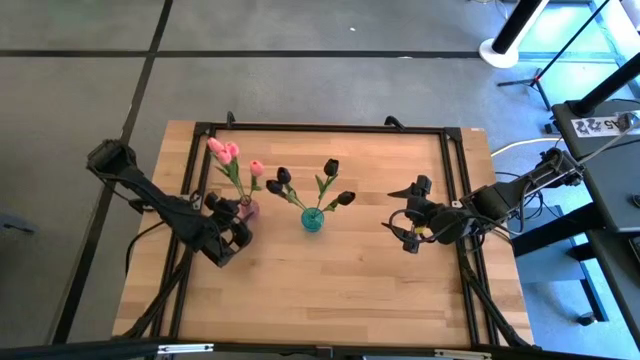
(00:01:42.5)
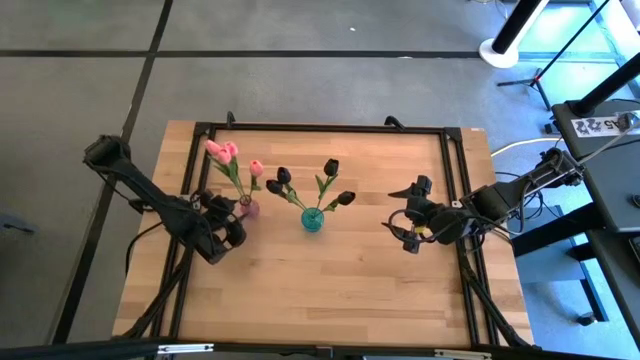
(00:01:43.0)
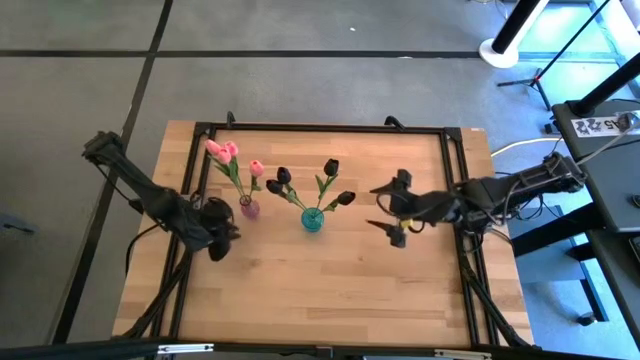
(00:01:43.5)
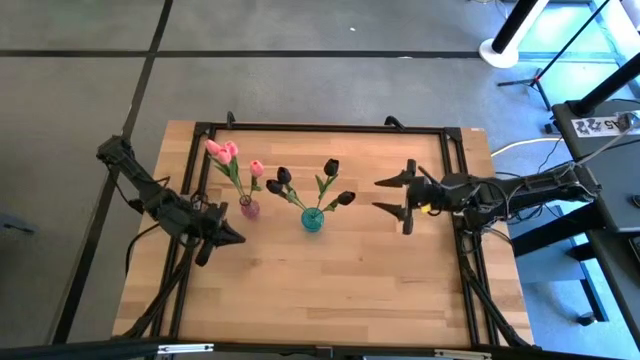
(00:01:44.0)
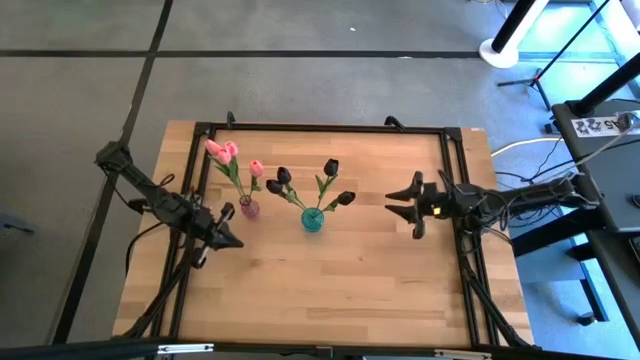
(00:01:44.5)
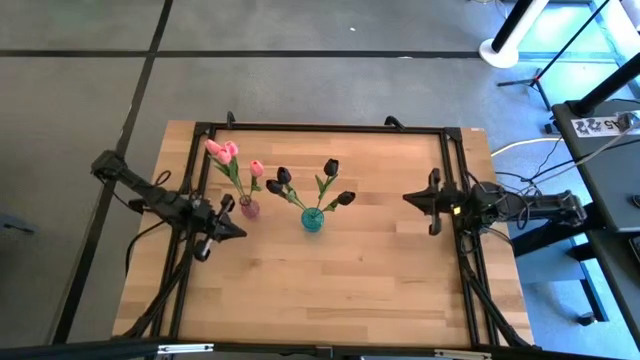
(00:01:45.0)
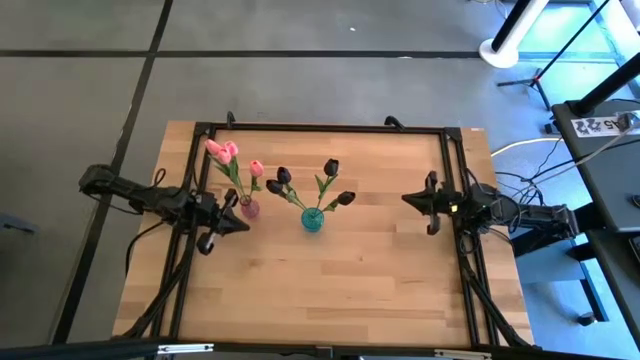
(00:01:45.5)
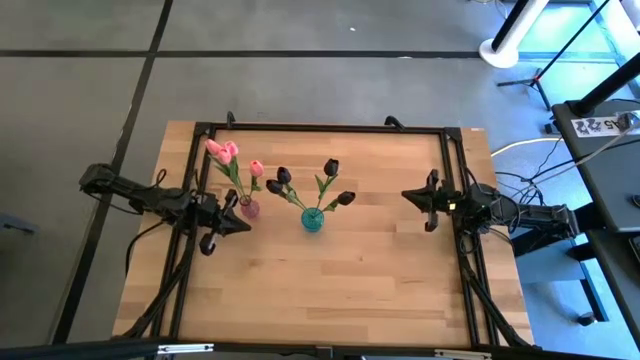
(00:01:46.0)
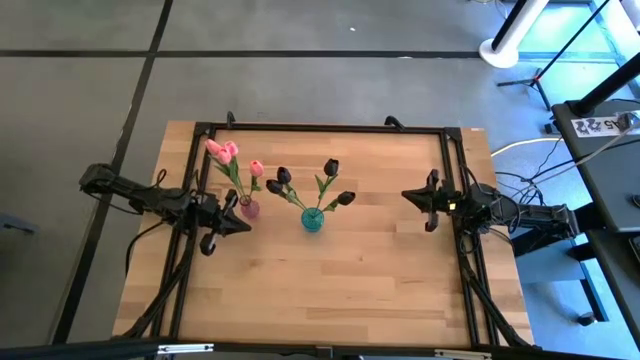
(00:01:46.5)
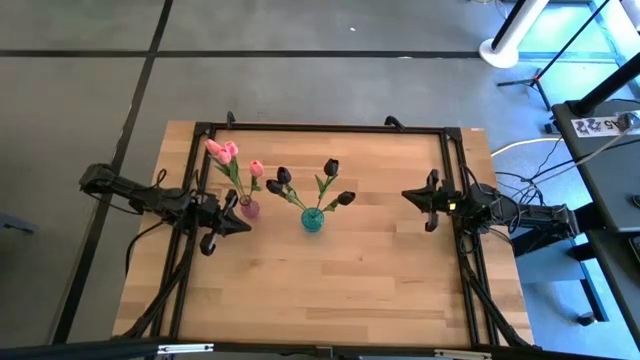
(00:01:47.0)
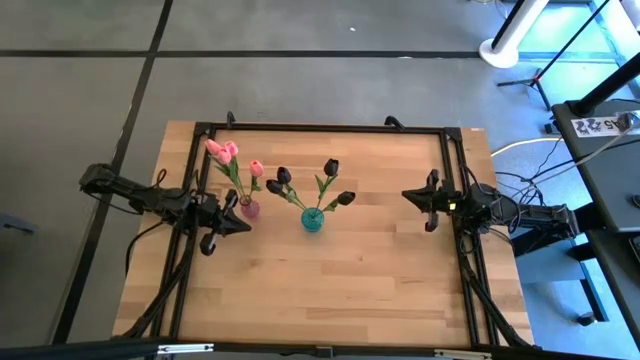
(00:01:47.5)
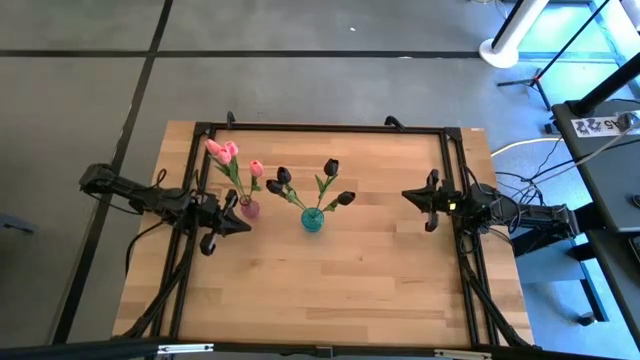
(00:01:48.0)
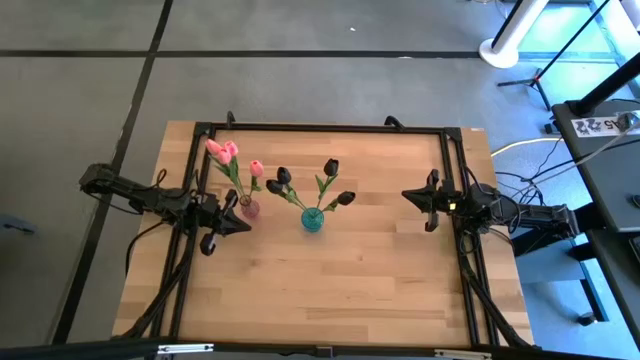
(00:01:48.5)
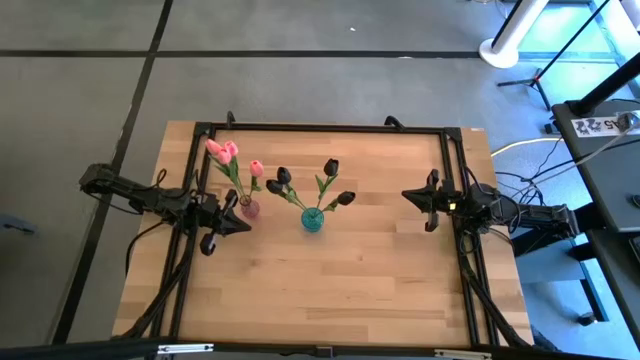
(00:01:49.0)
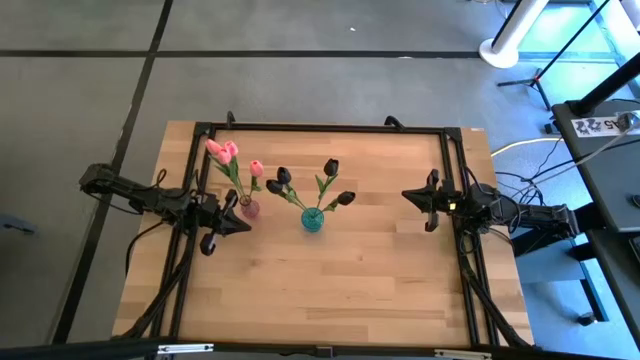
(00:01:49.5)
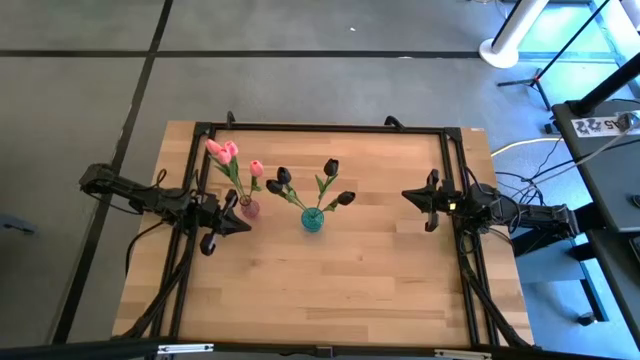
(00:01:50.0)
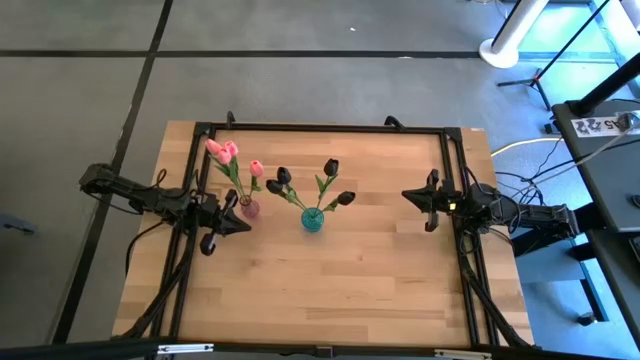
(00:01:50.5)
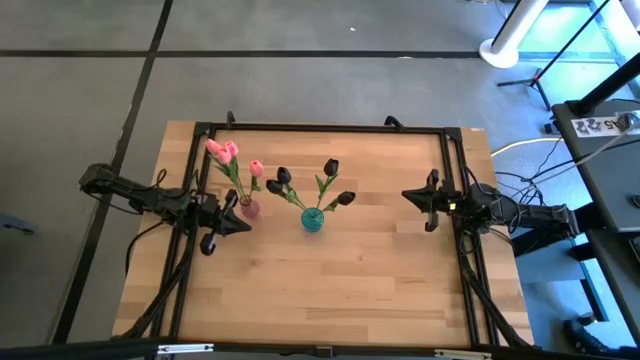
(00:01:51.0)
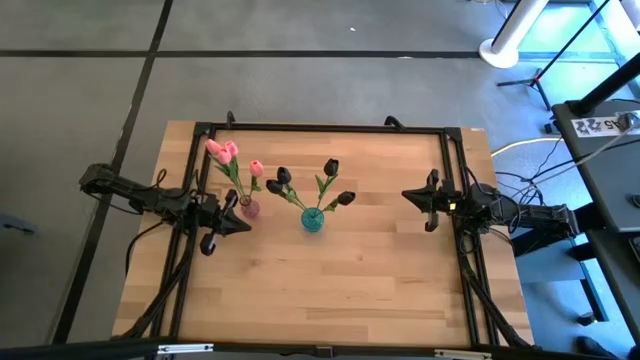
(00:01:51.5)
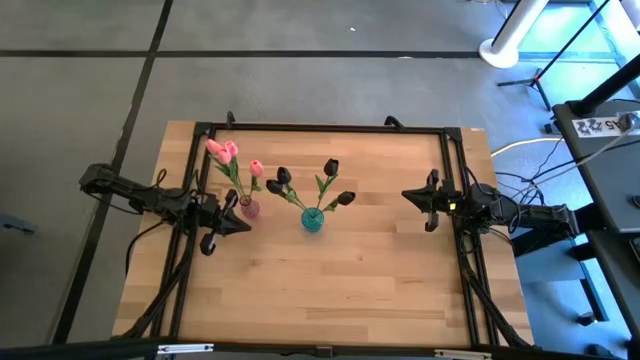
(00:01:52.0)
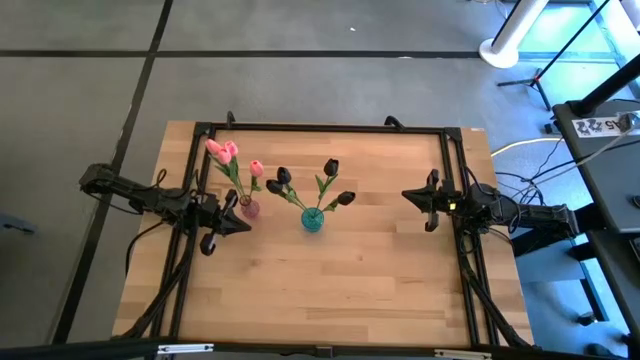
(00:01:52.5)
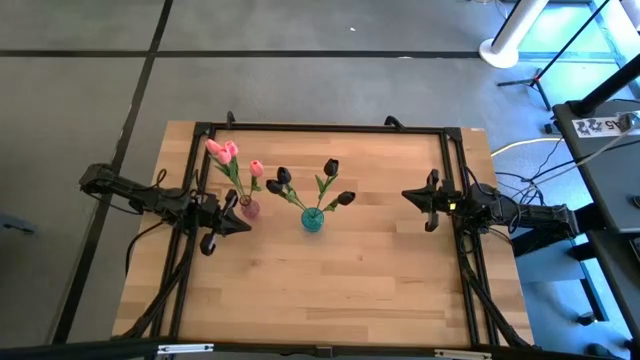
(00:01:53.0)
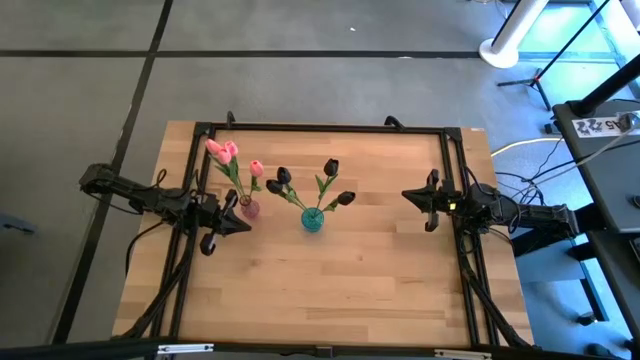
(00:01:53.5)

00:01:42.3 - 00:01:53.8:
Task: Sort flowers into vase by color
Return to Home Position

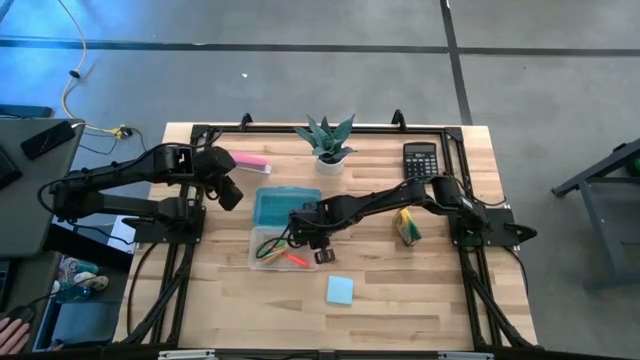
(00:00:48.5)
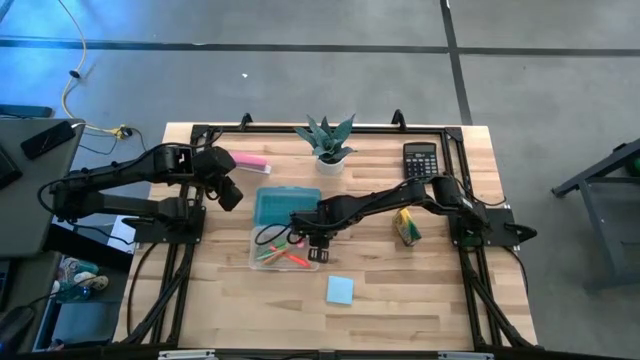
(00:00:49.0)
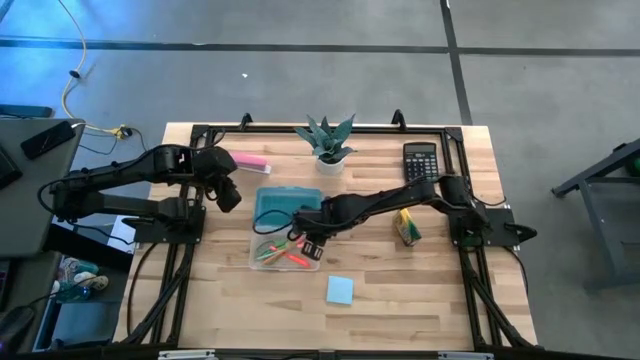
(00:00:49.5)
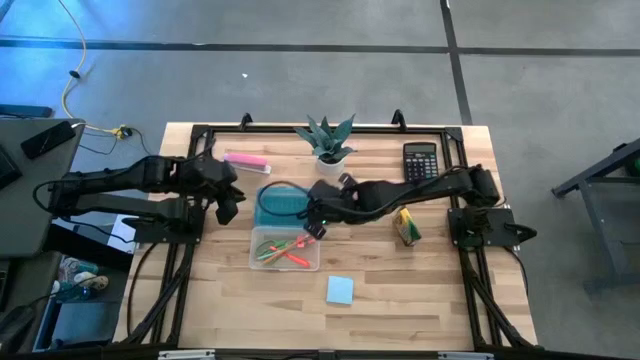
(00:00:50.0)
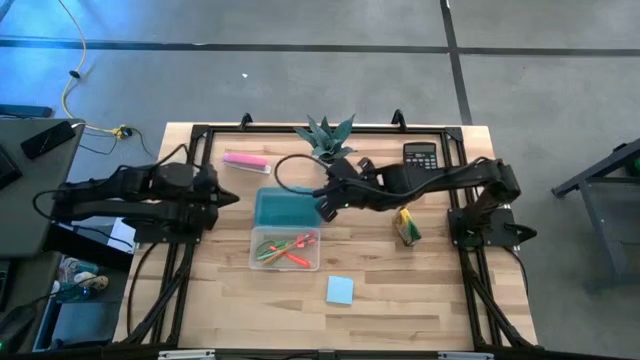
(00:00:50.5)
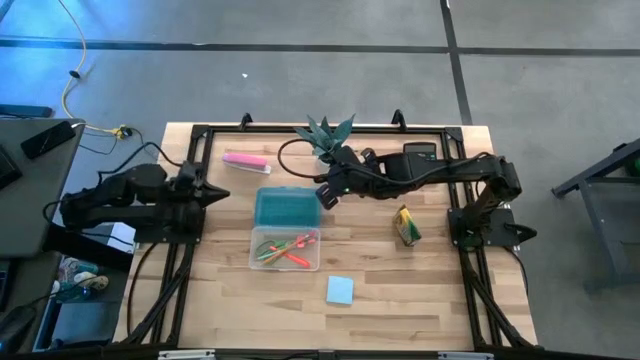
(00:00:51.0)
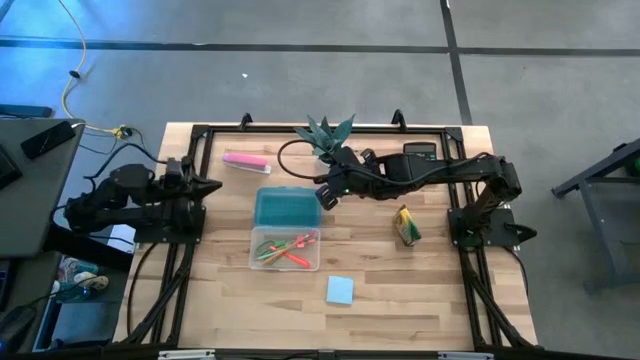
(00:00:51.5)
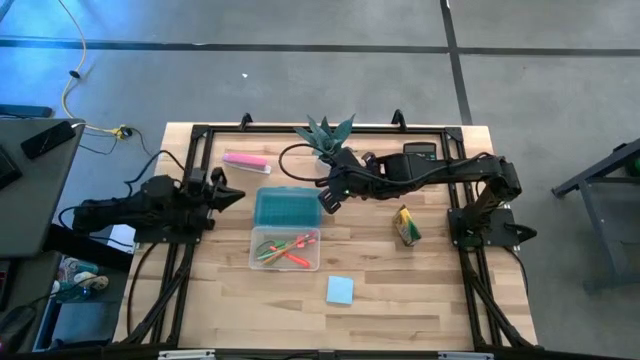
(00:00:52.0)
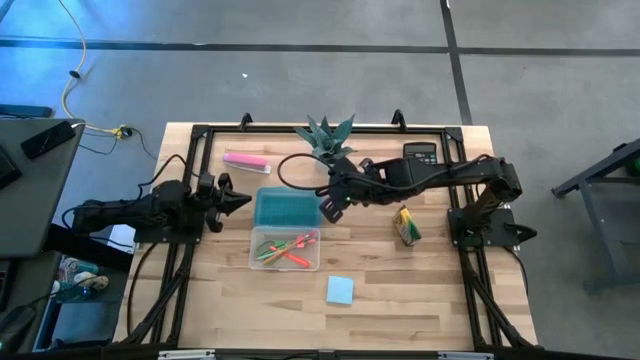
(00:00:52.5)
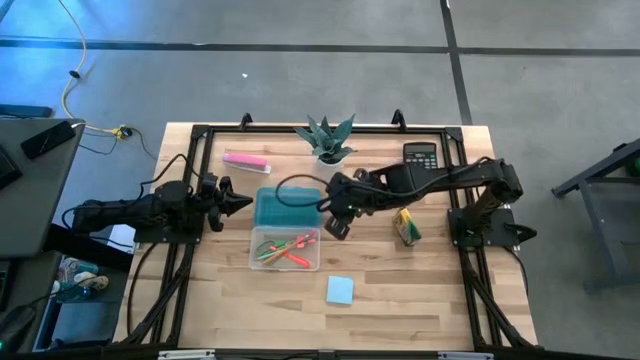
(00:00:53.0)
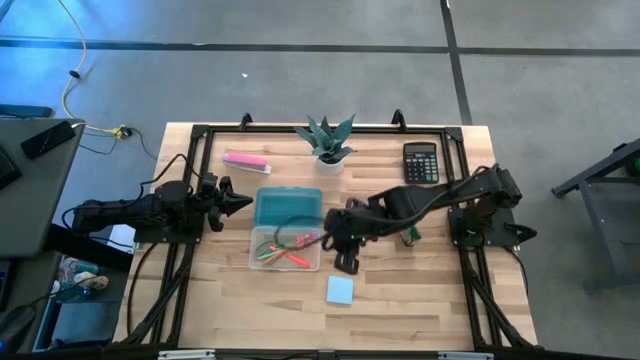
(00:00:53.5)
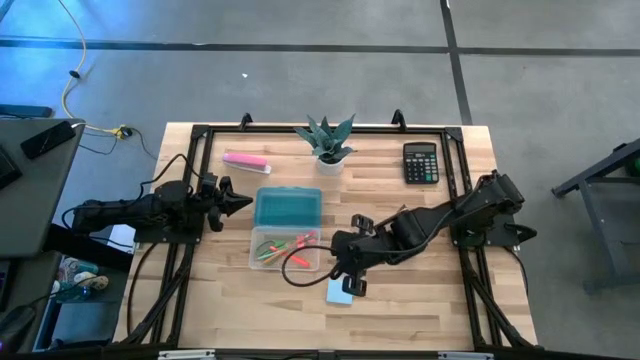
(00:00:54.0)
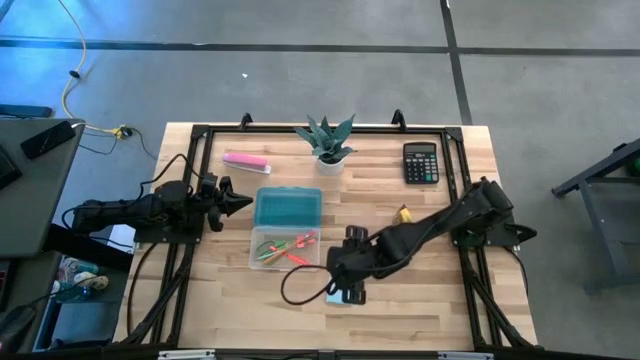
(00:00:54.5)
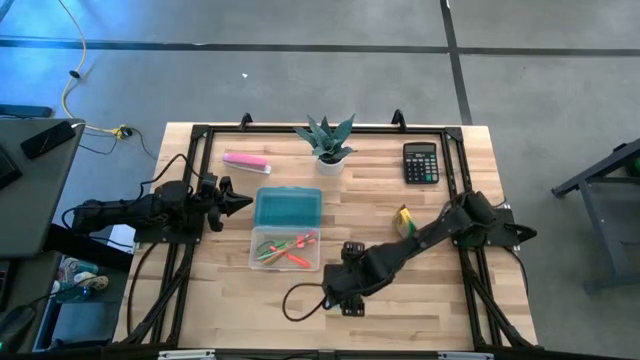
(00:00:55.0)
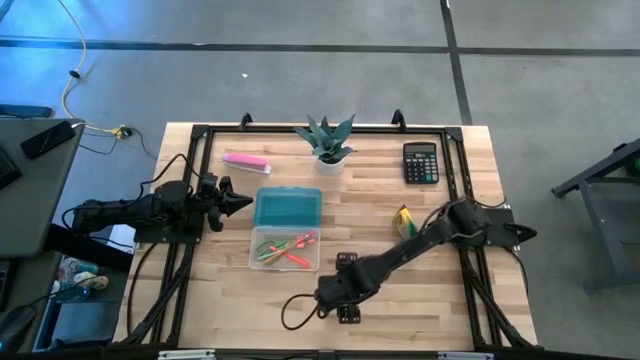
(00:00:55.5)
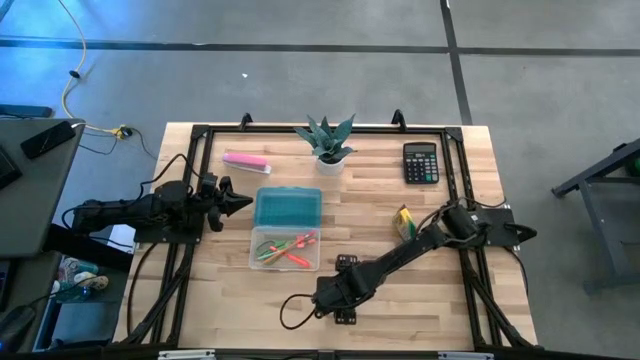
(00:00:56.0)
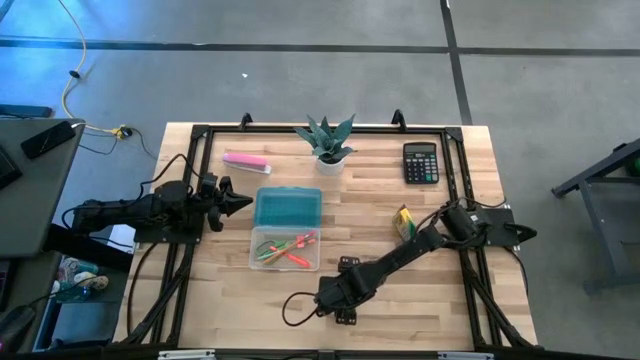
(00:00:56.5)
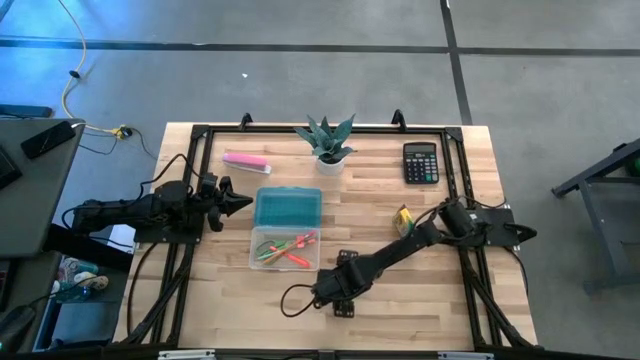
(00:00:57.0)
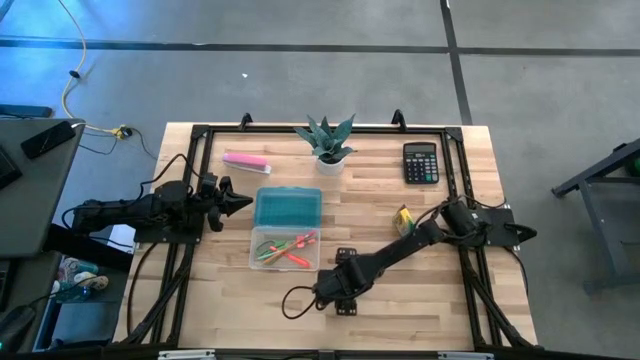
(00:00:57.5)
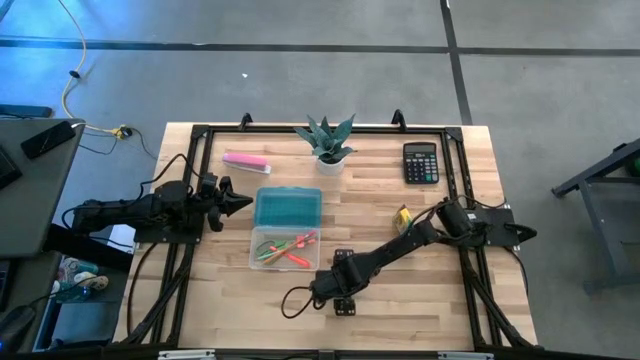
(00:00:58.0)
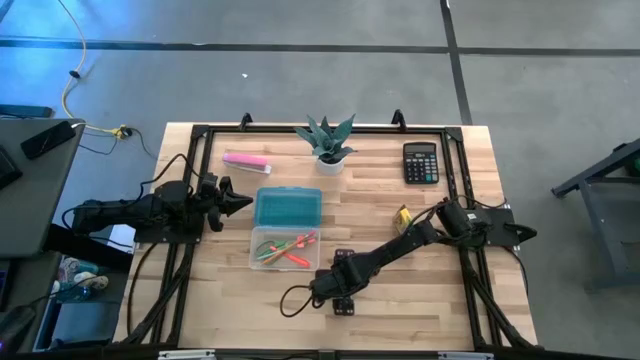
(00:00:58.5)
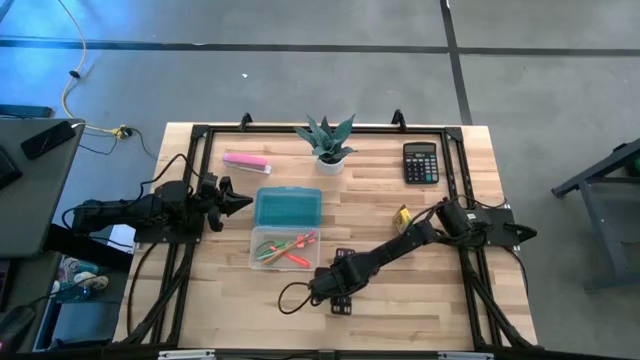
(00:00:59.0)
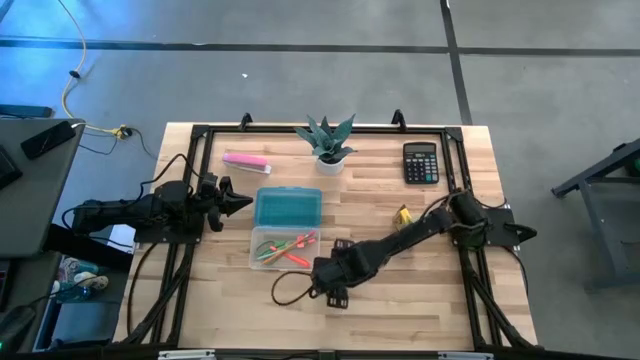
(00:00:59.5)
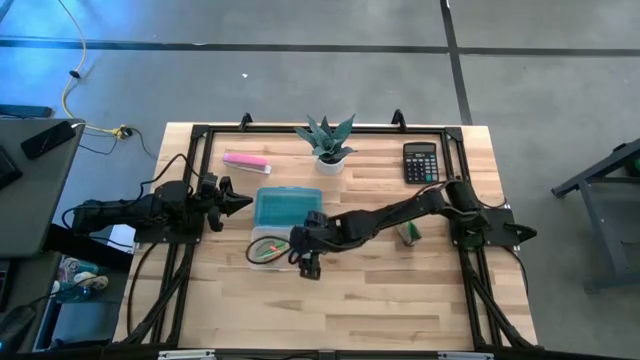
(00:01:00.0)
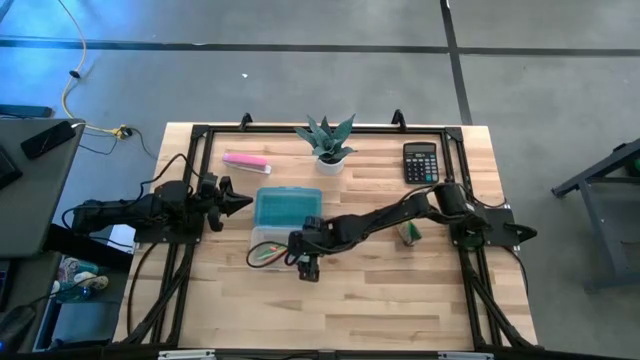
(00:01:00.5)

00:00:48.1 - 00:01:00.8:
Task: Pack school essentials
Put the blue sticky note into the blue supply box
